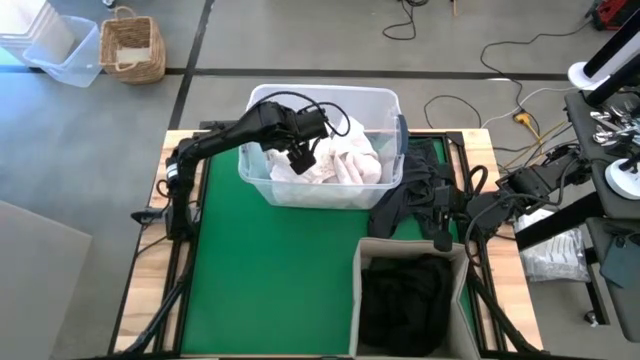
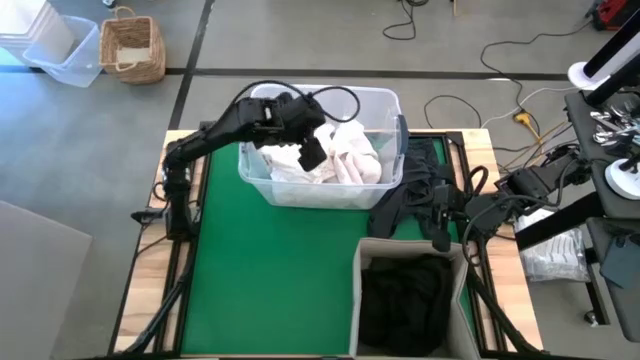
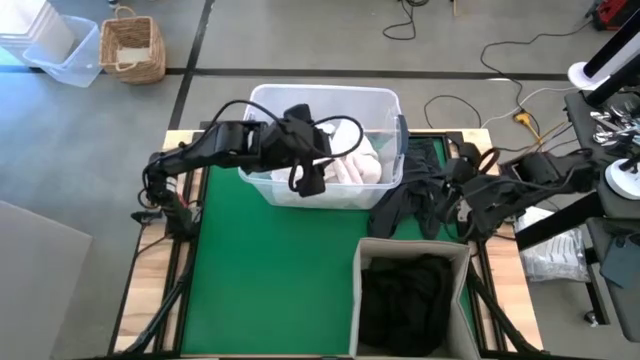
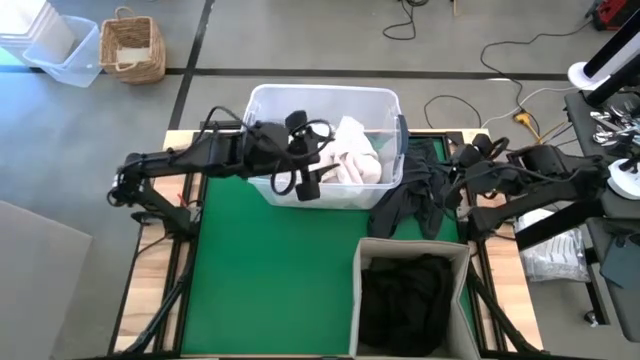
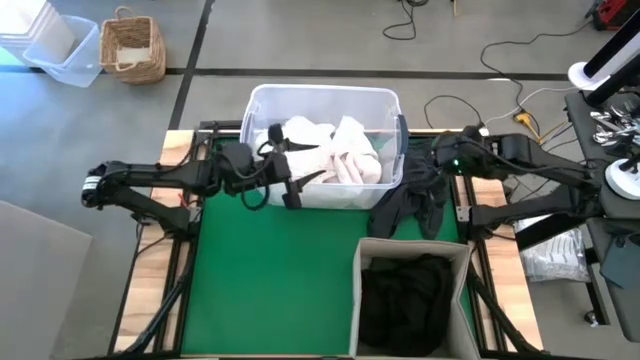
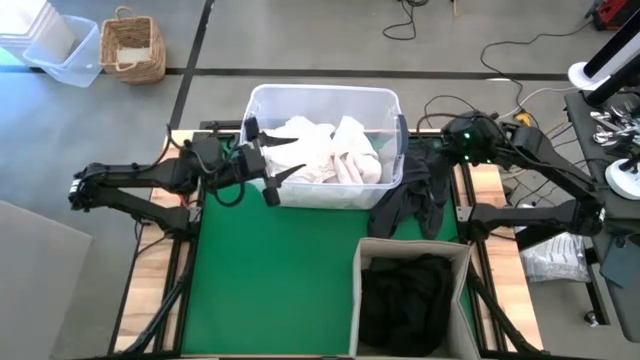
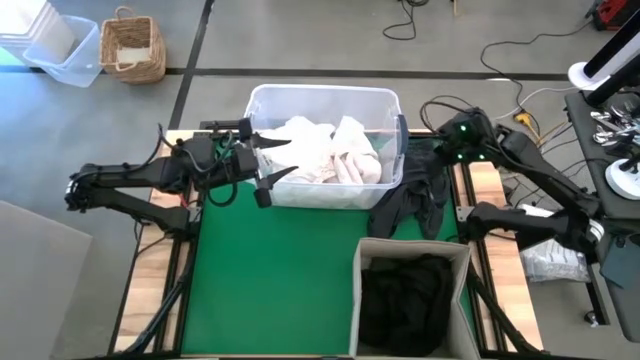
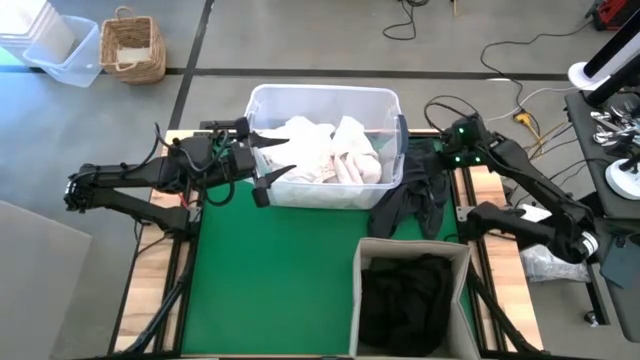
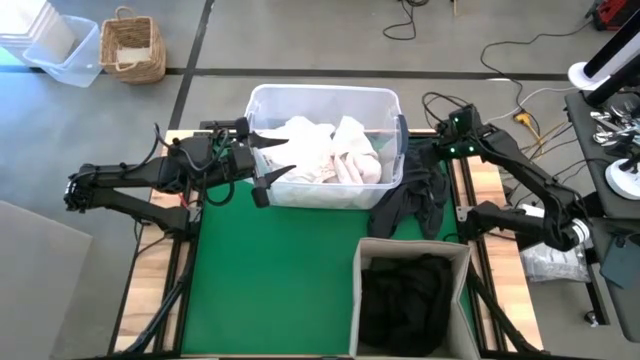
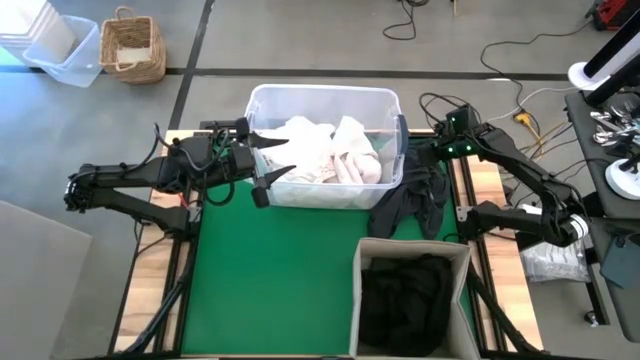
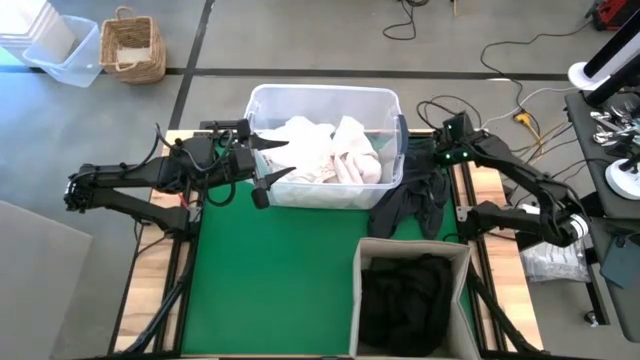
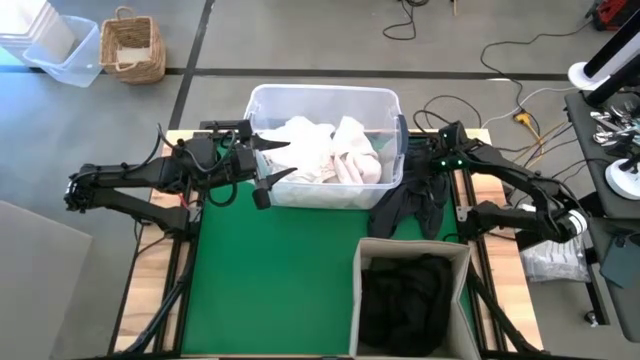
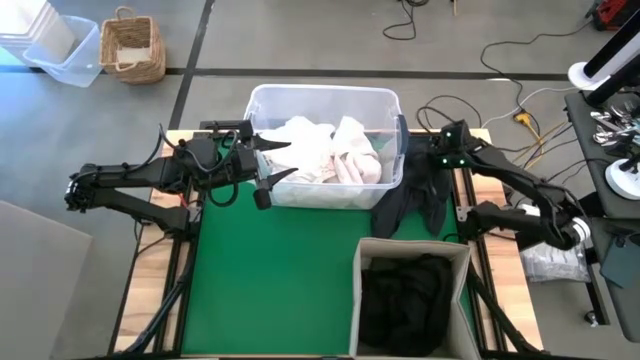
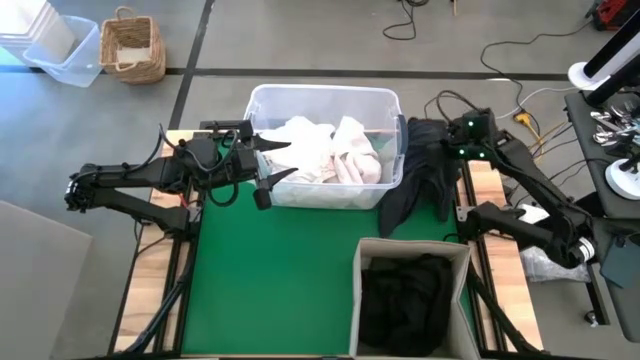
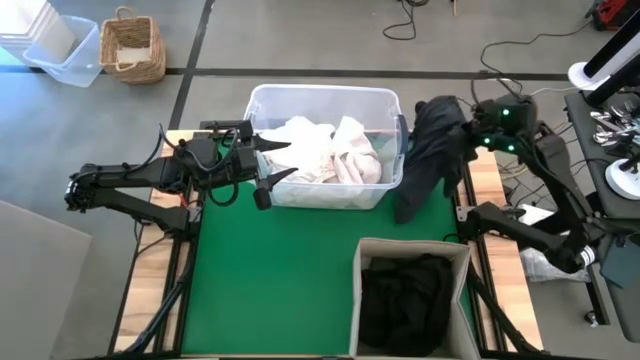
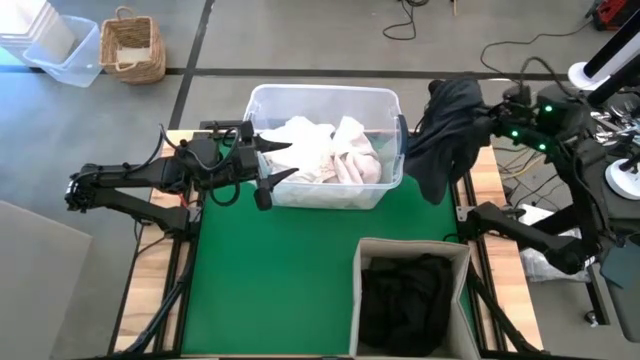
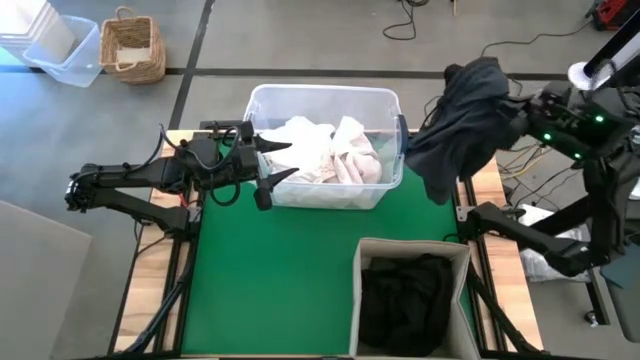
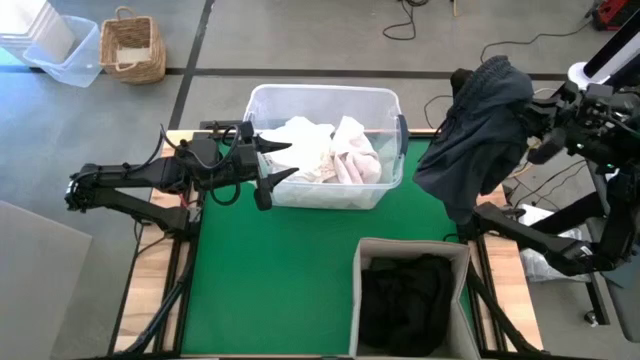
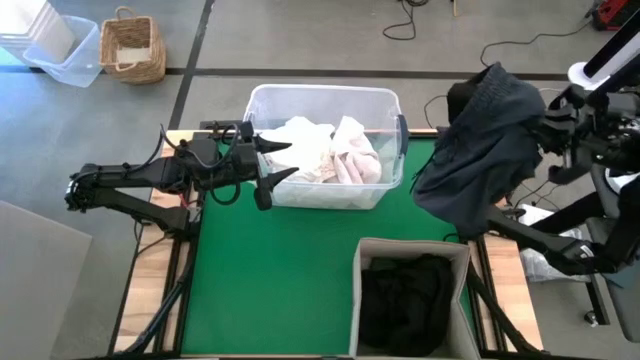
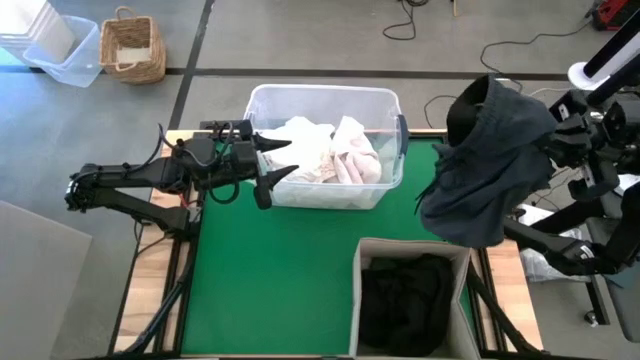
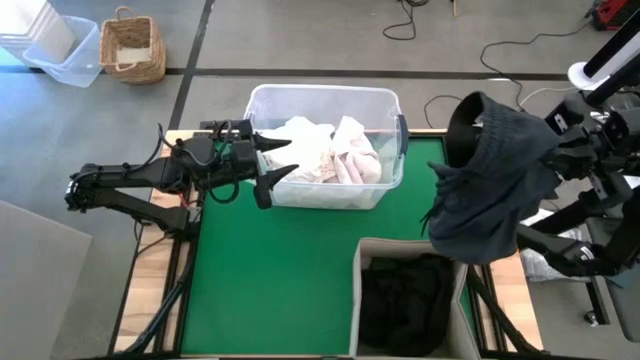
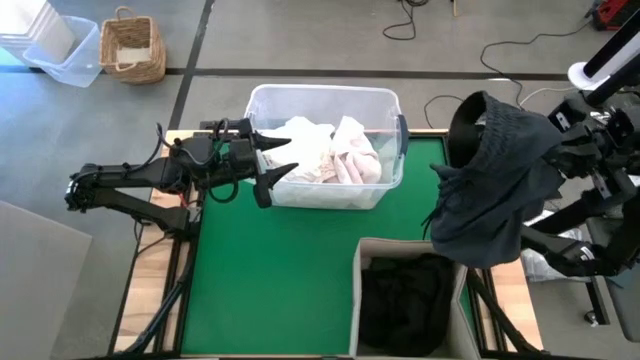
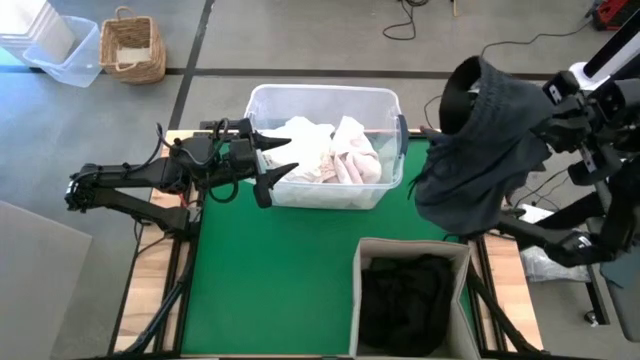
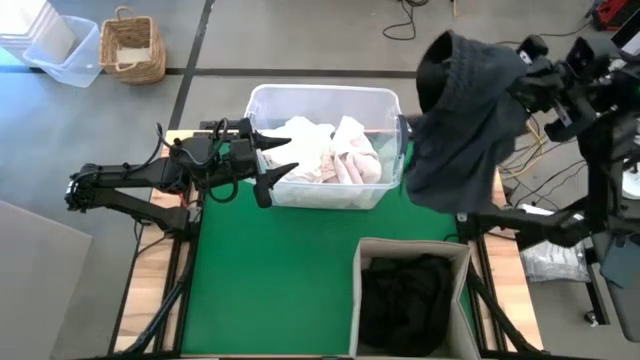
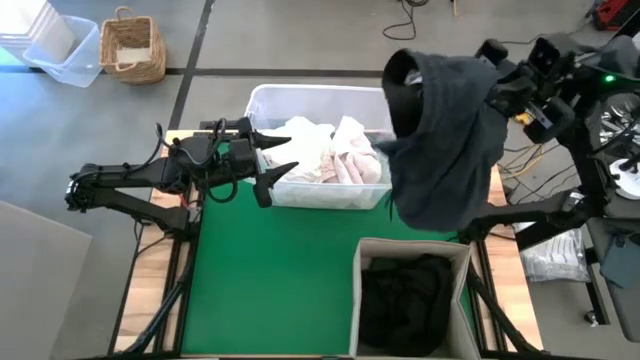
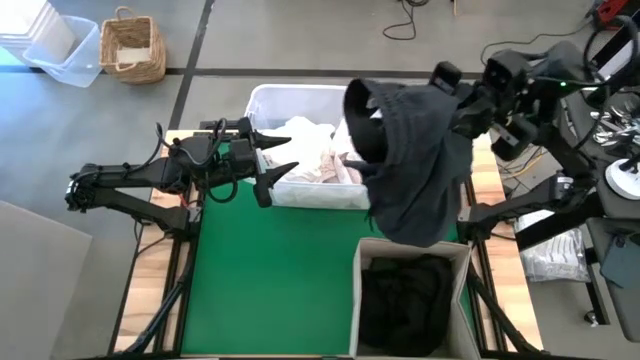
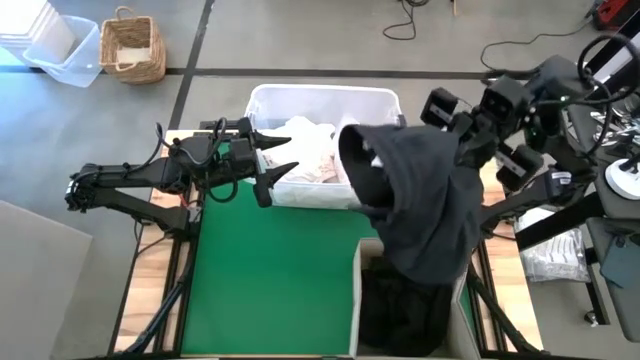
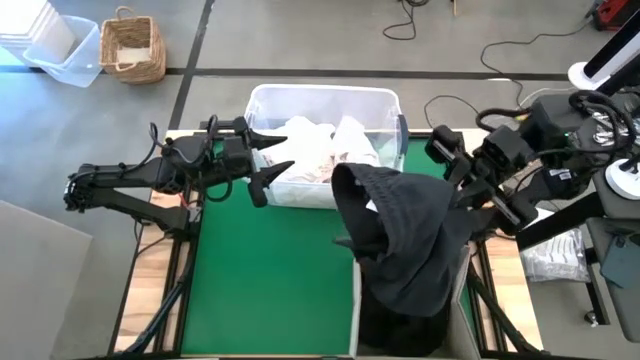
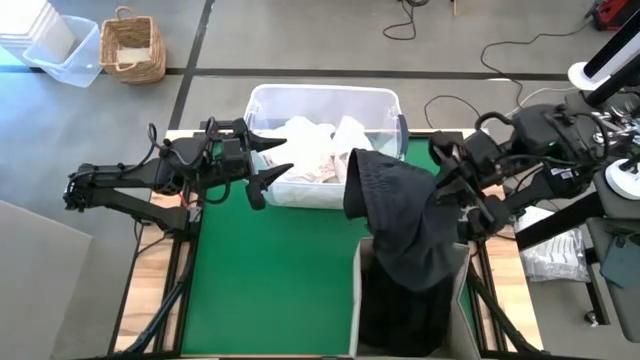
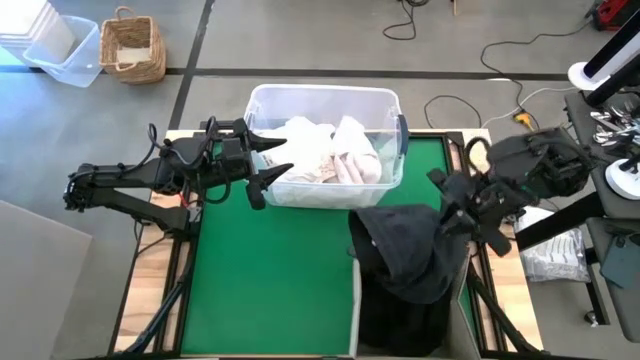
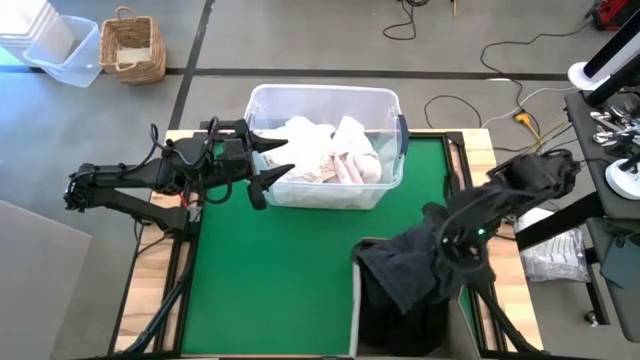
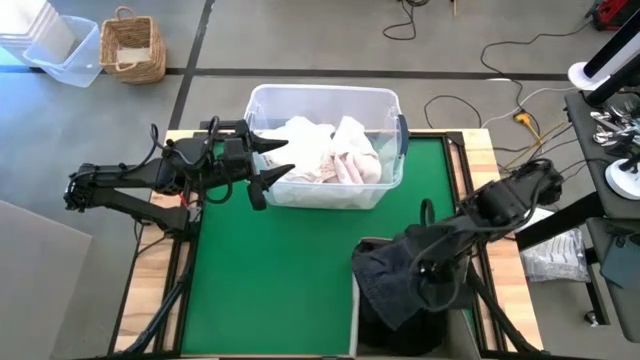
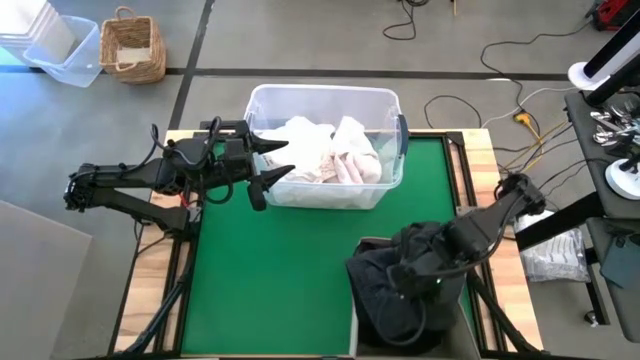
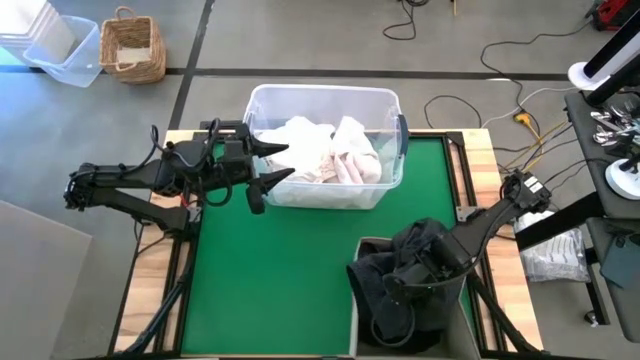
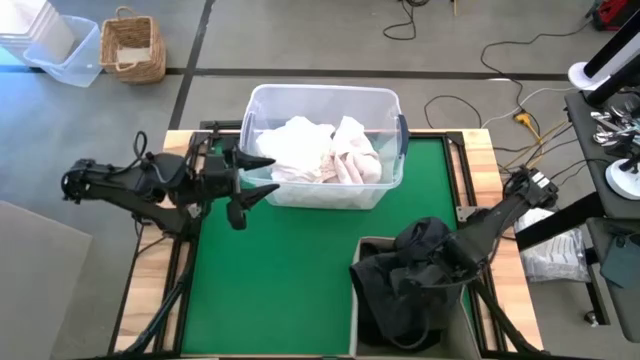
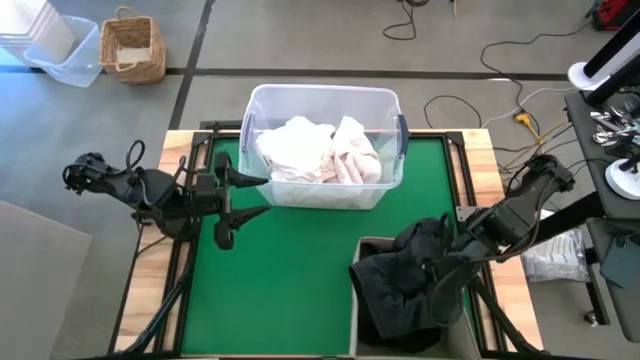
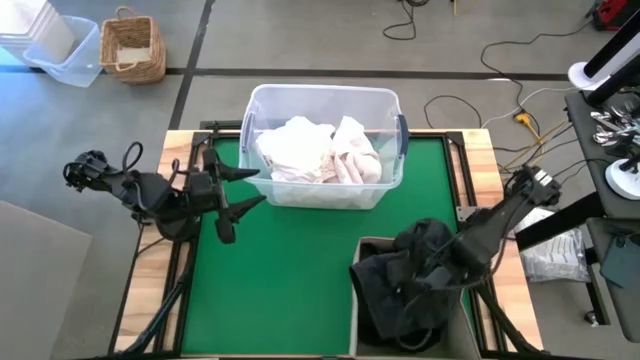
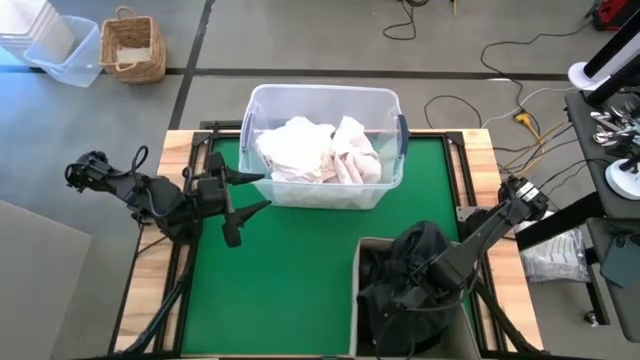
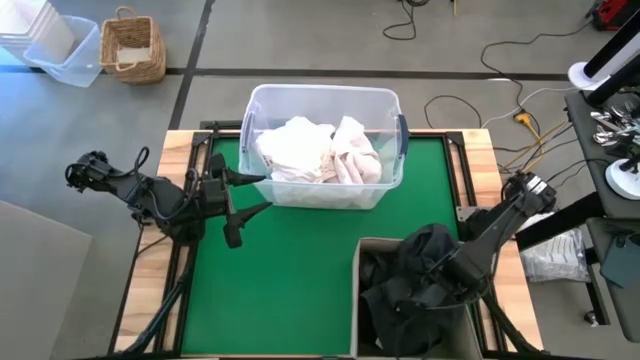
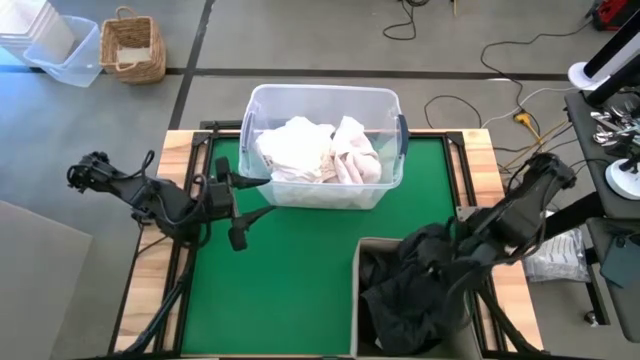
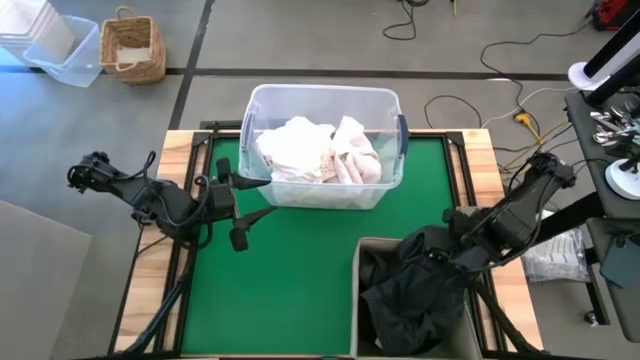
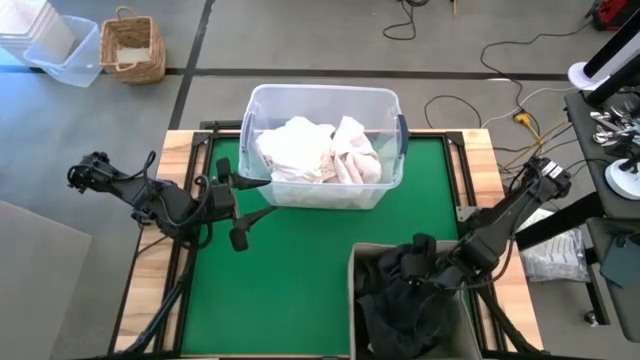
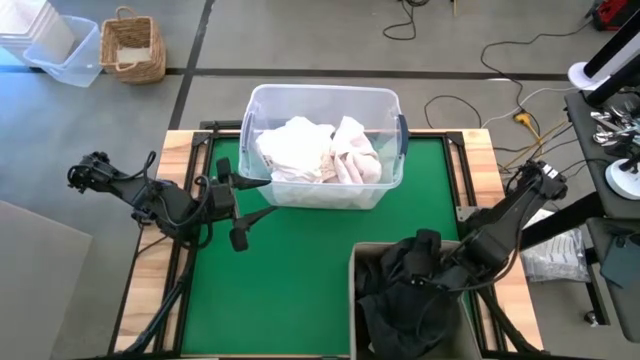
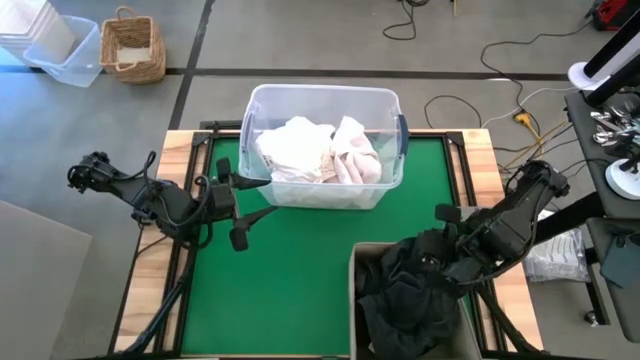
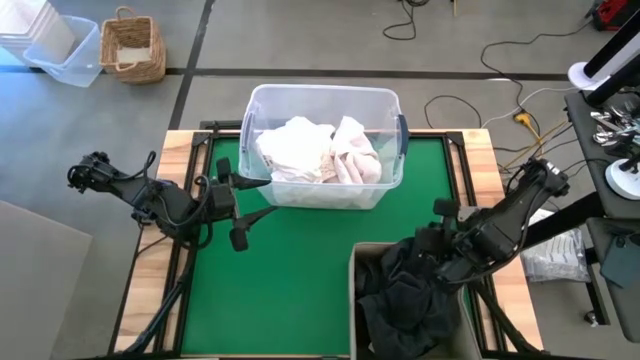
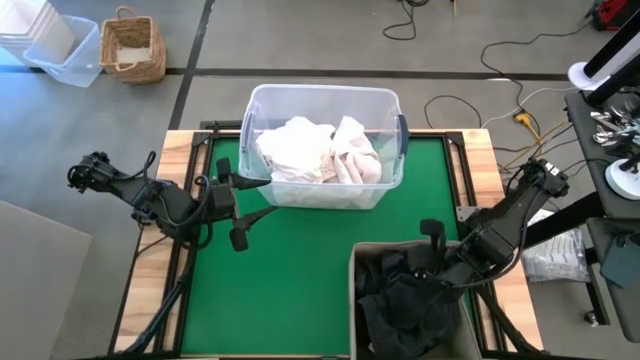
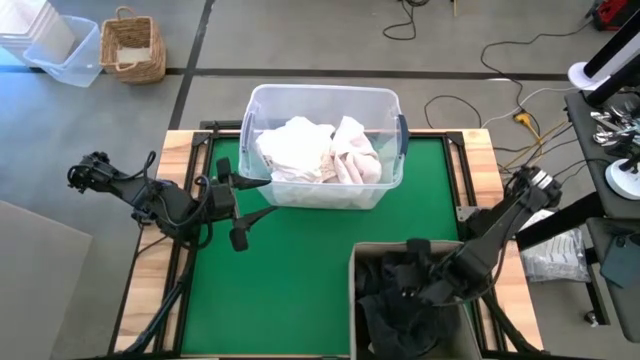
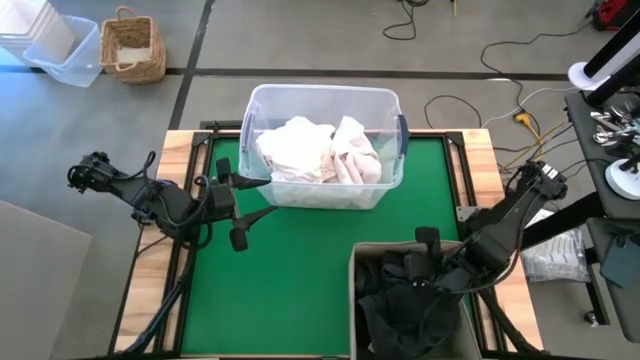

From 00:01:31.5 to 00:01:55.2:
Put the dark gray pants into the brown laundry bin
